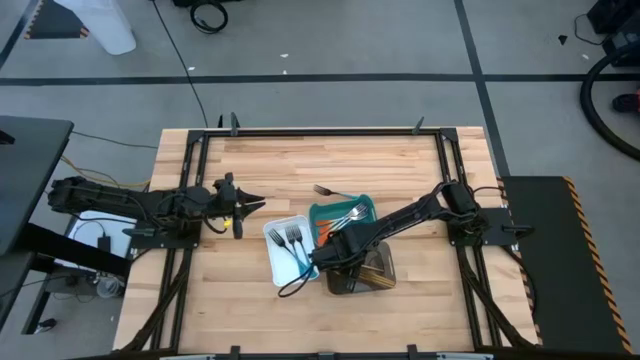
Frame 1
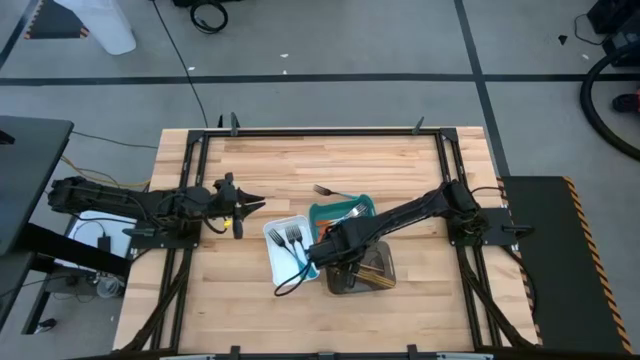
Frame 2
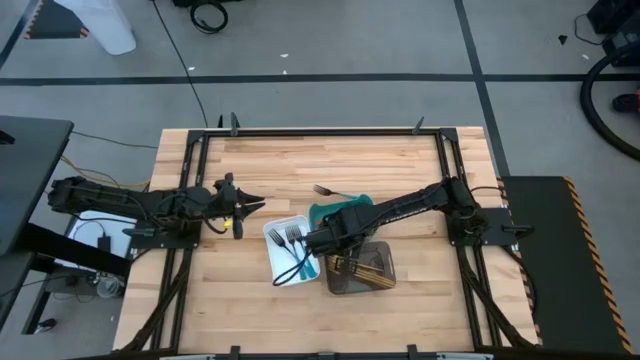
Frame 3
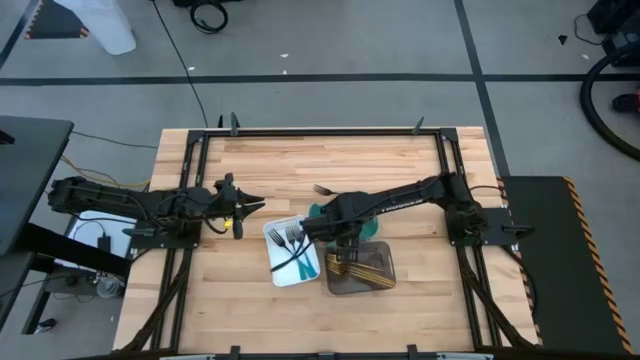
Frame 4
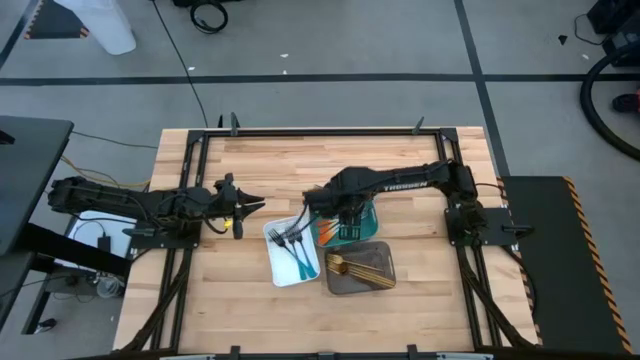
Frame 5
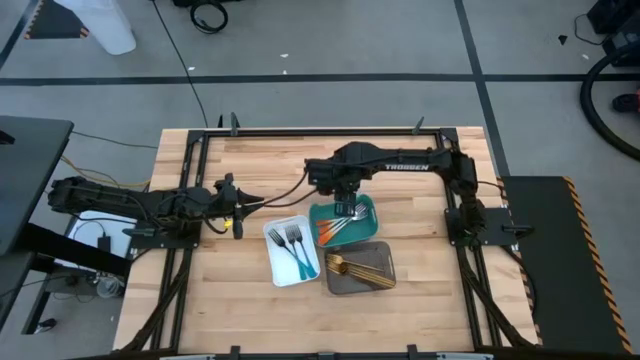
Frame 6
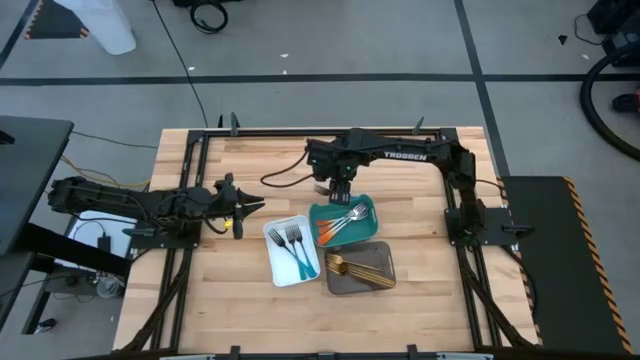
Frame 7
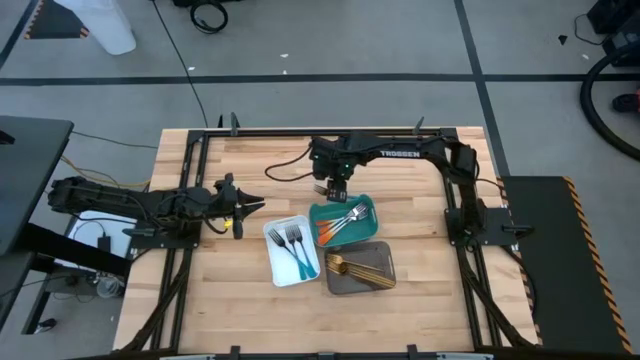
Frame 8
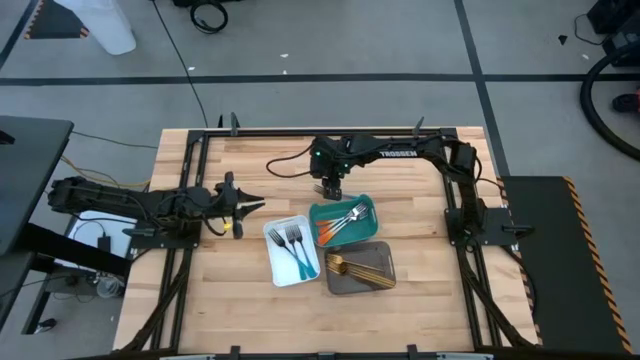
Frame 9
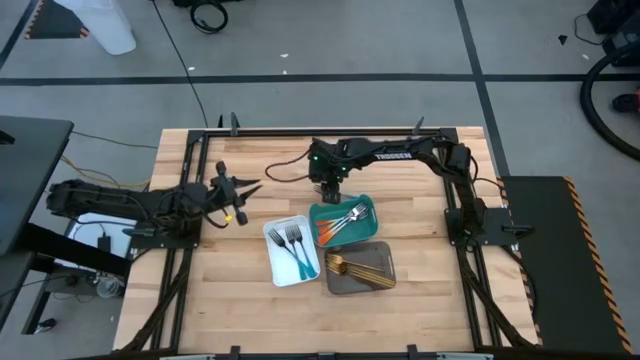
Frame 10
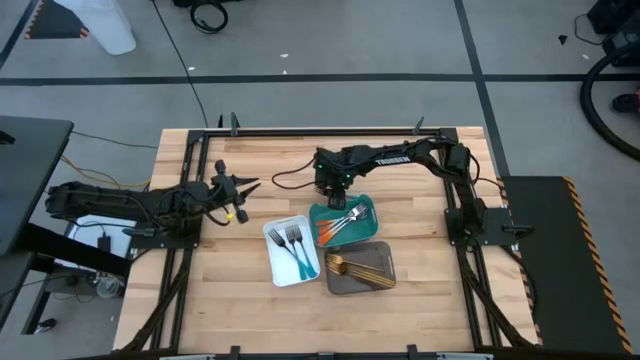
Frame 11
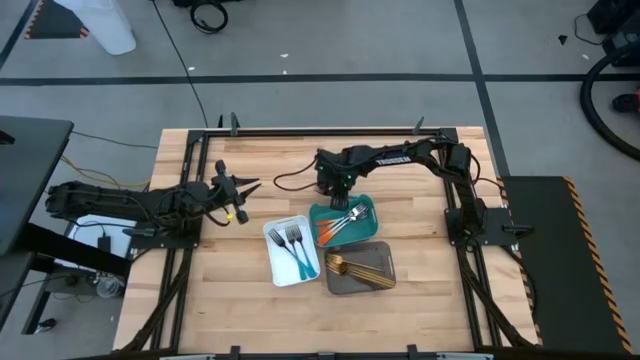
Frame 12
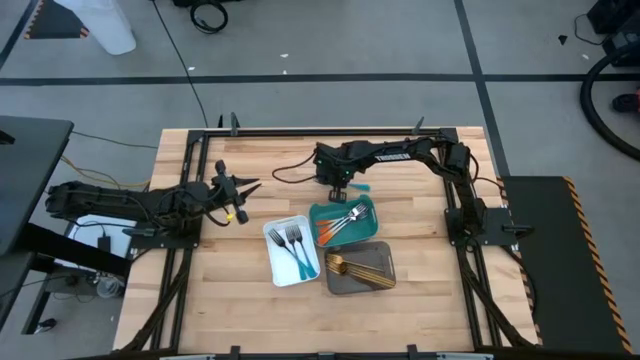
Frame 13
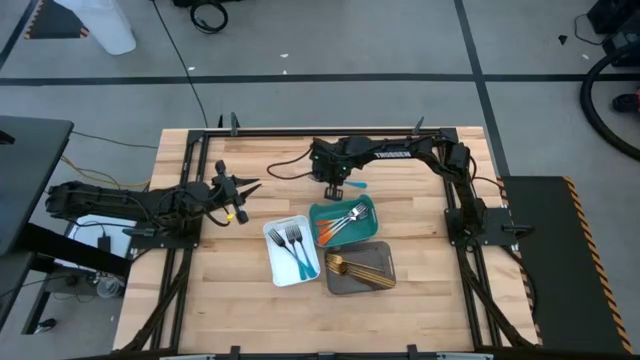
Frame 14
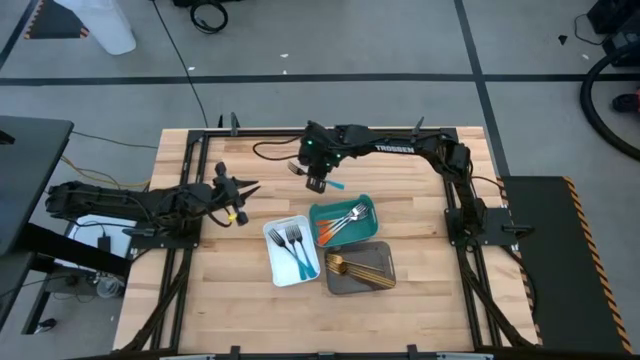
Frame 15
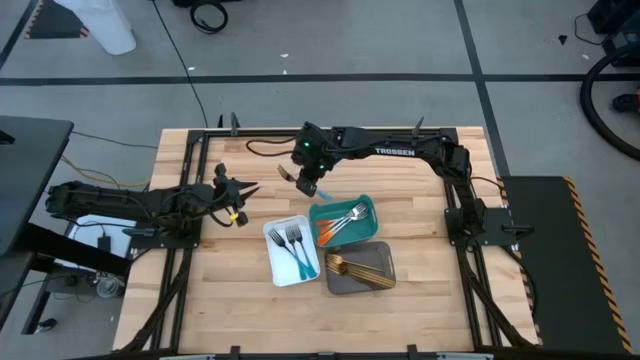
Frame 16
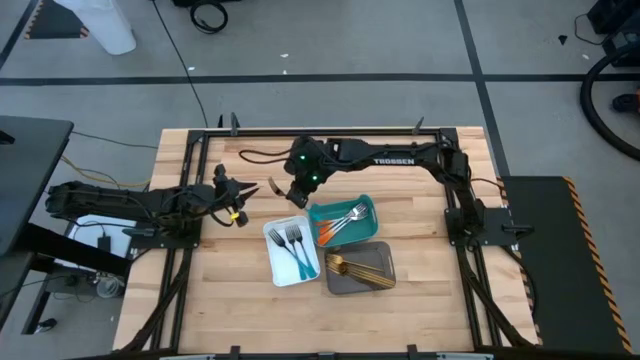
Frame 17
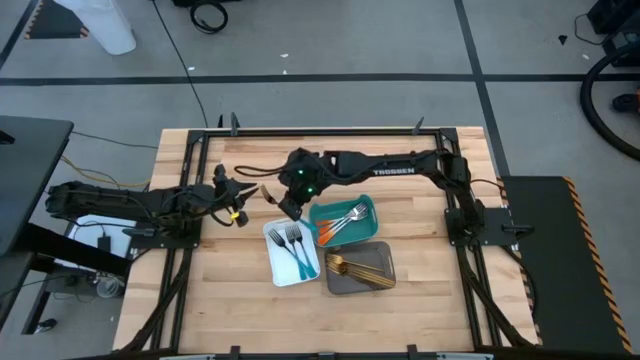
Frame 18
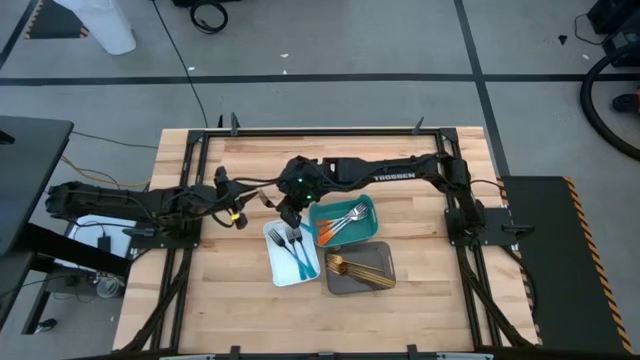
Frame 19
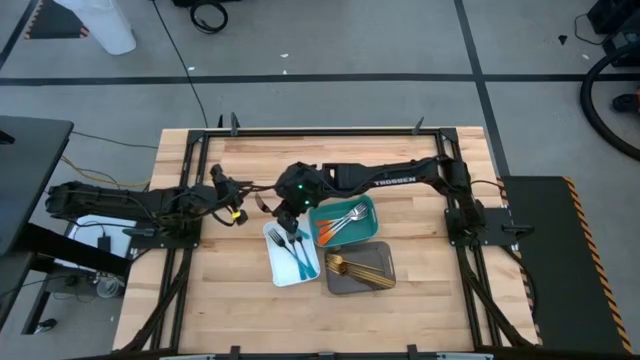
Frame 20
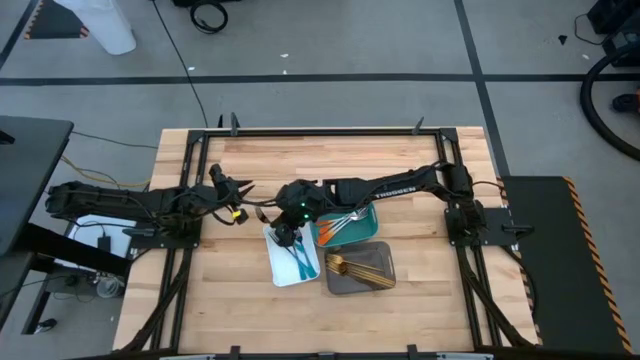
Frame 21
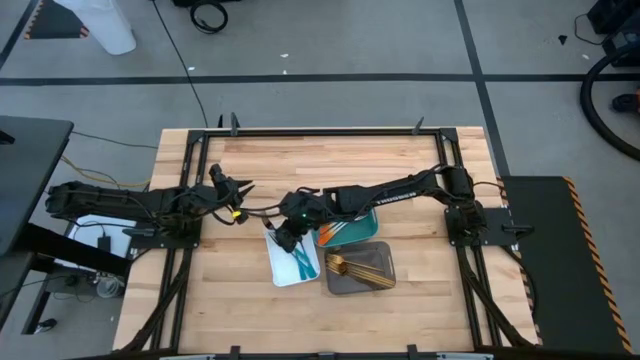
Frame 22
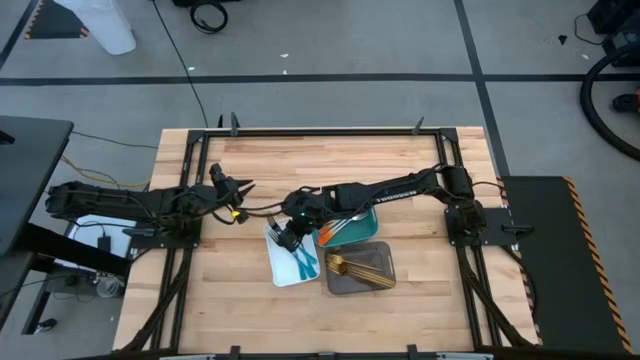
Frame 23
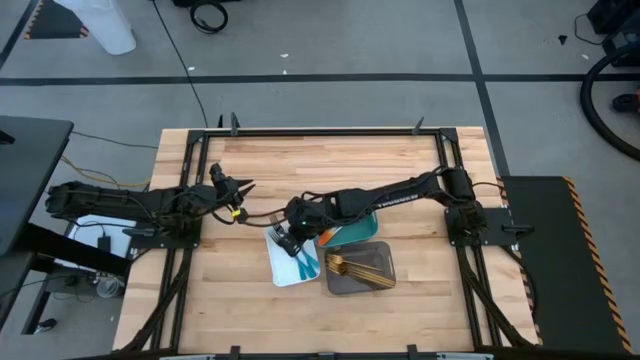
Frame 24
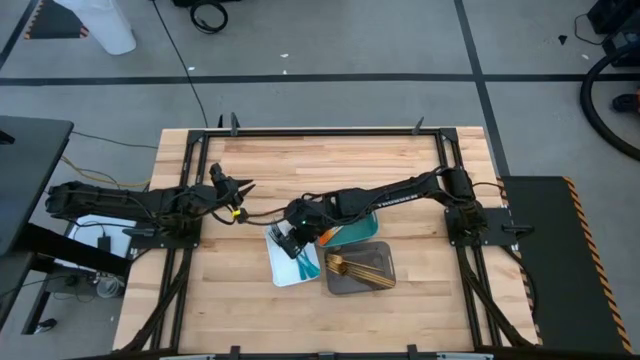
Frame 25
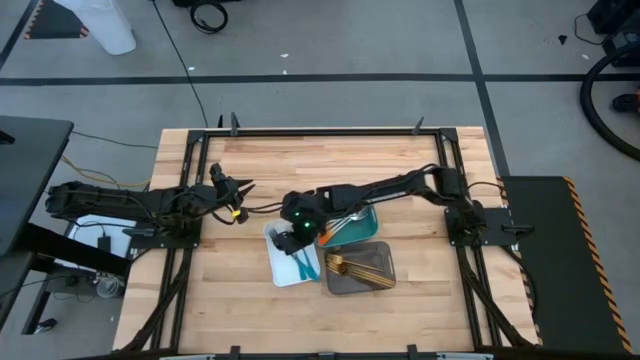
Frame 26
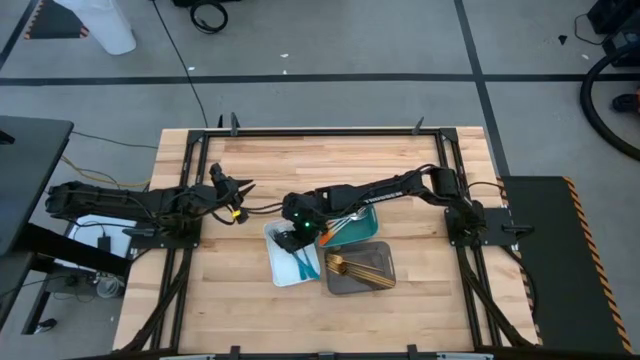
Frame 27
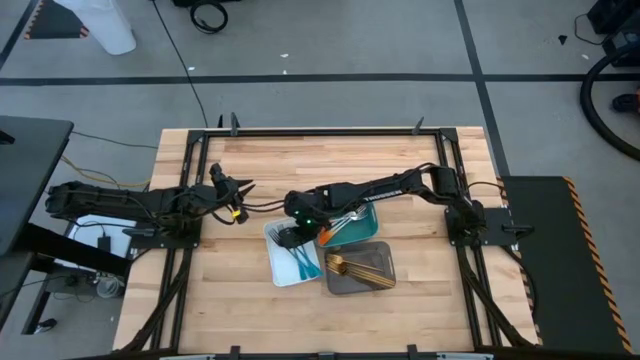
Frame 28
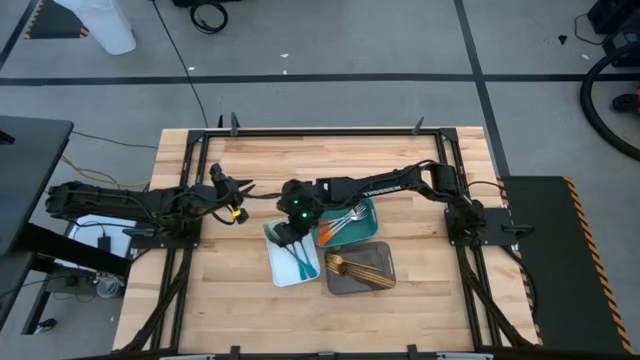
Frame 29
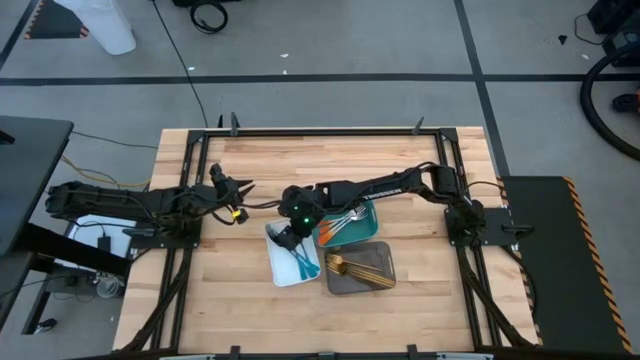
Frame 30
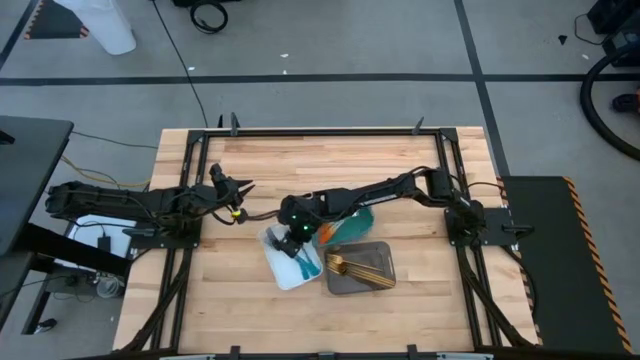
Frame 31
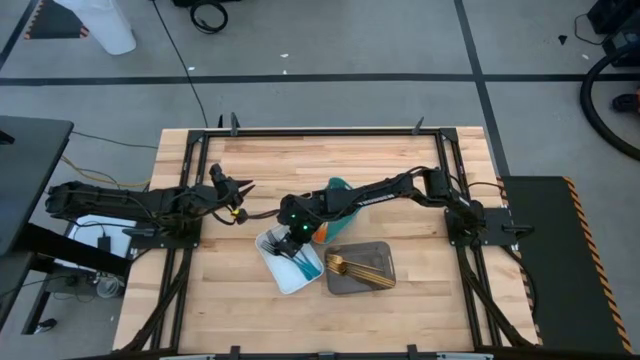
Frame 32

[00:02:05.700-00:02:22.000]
Task: Sort silverware by color (type)
Put the blue fork into the white bin

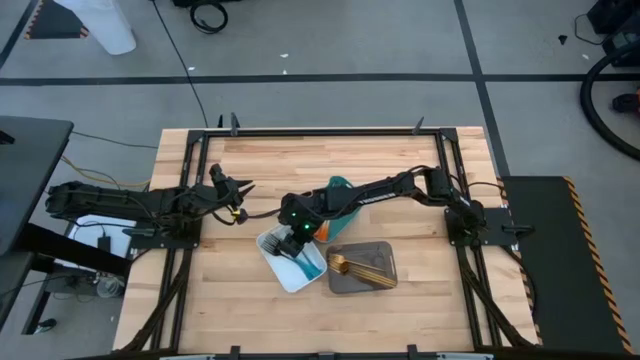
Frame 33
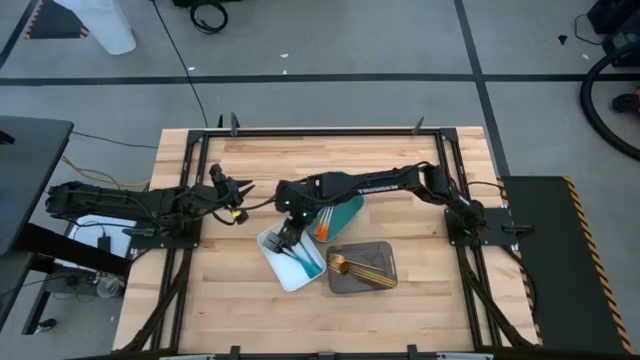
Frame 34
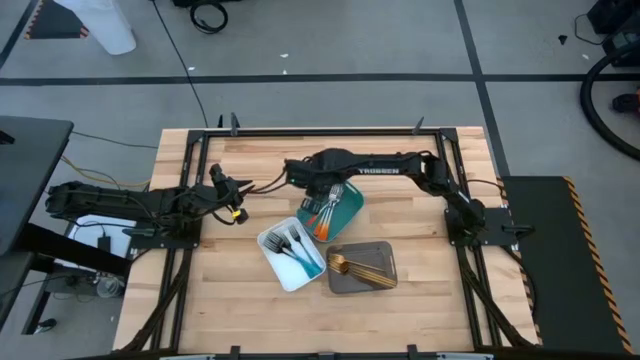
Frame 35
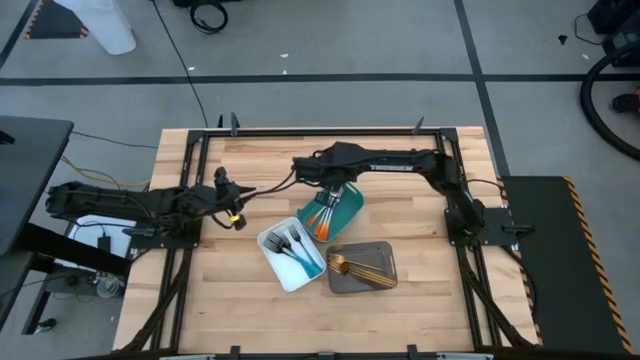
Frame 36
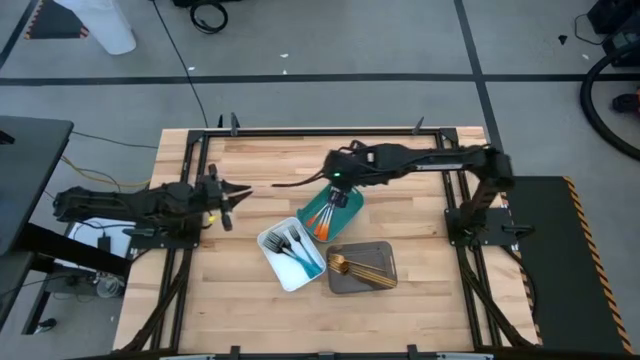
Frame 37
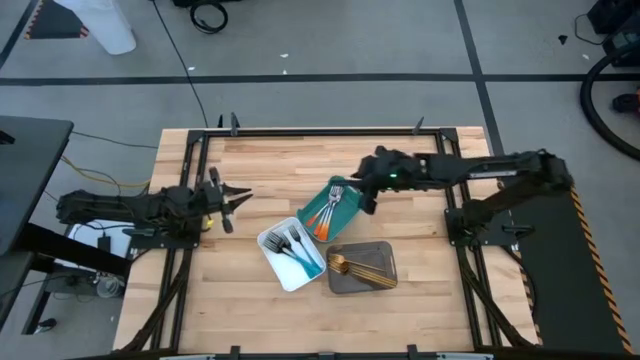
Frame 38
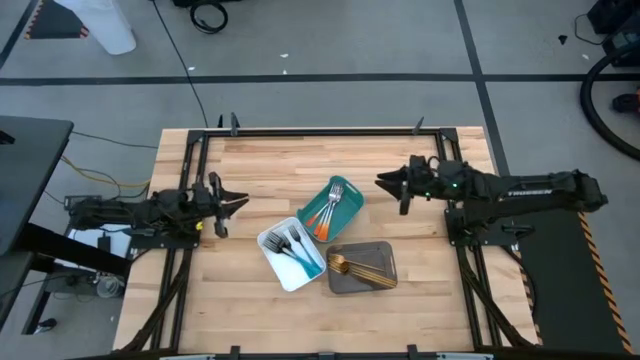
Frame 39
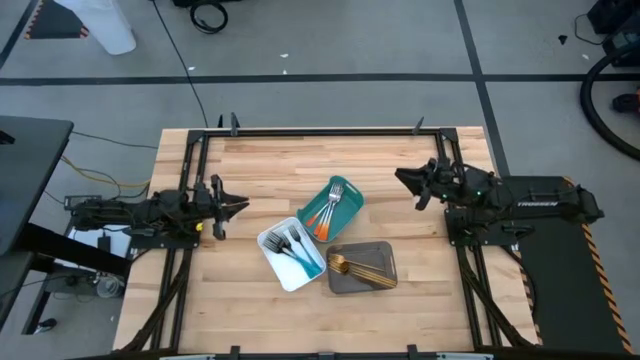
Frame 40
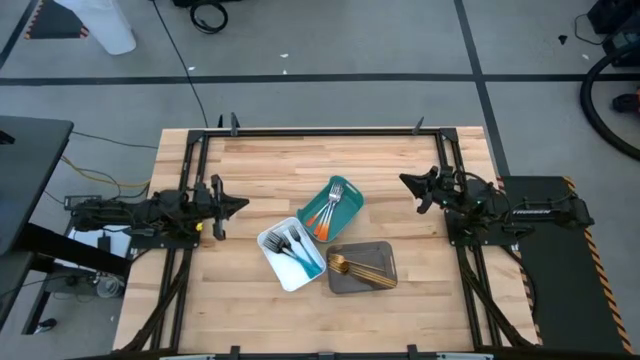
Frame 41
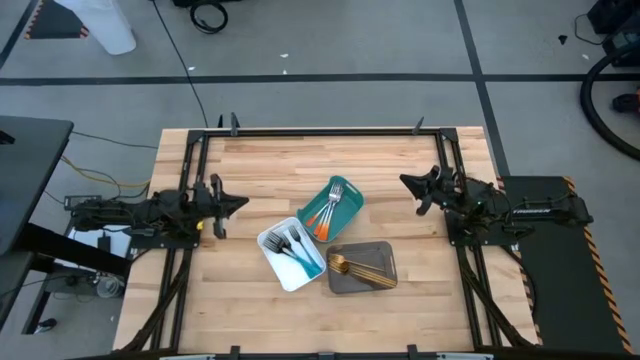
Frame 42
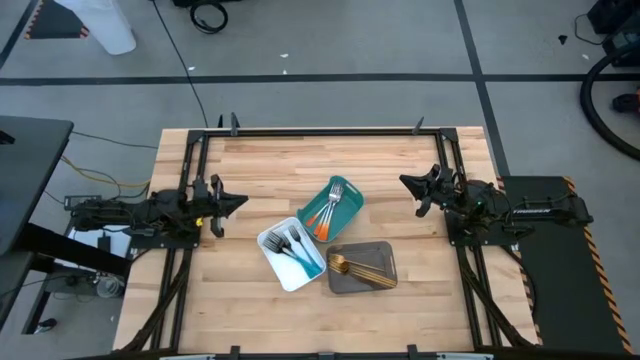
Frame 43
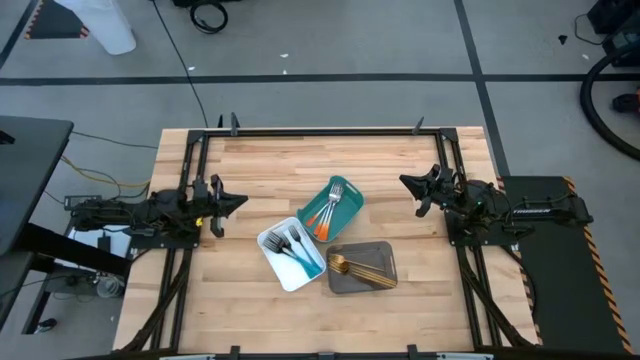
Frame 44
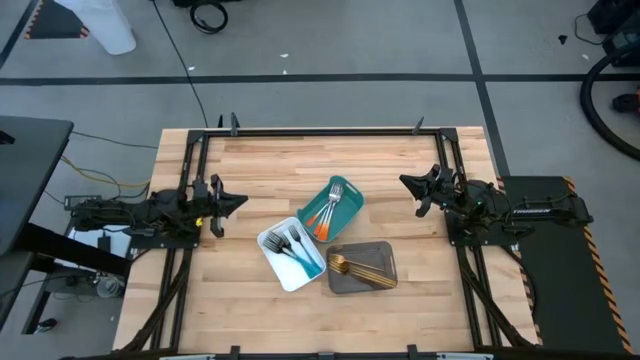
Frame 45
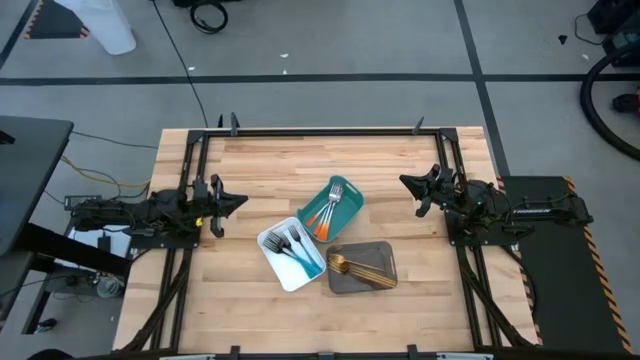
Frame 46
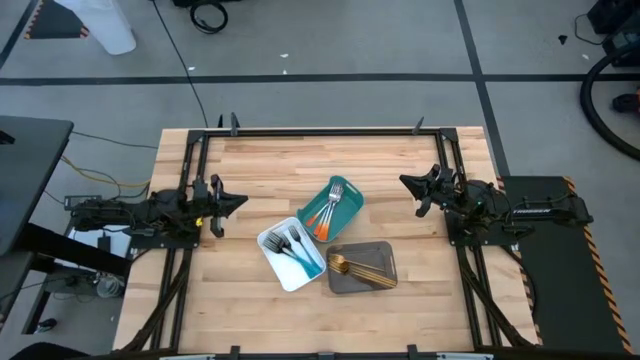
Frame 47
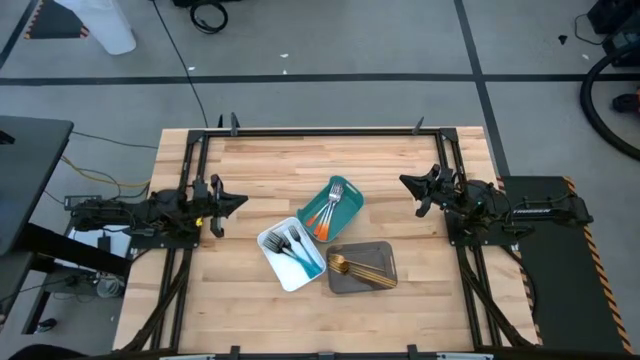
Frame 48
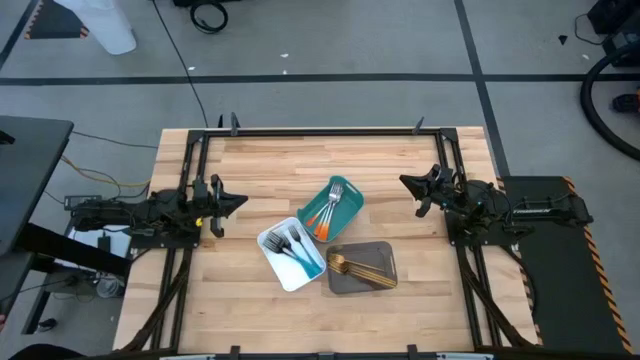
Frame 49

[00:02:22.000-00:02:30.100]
Return to Home Position
